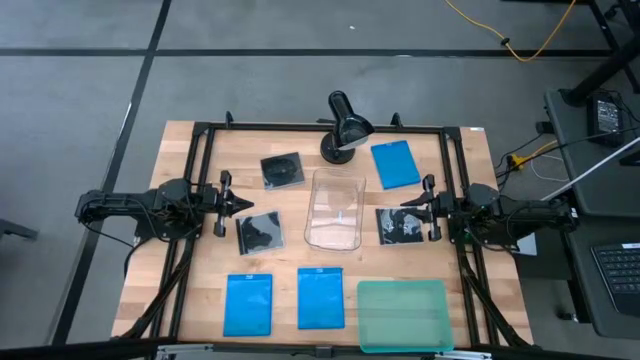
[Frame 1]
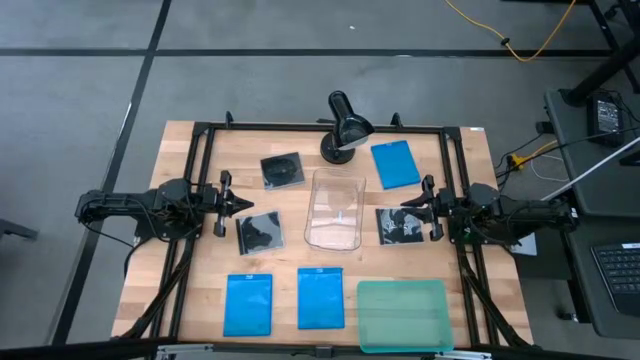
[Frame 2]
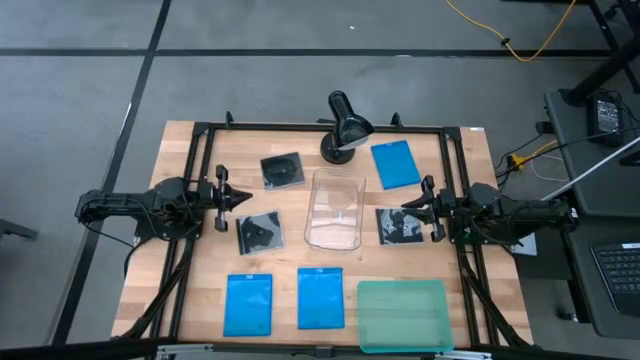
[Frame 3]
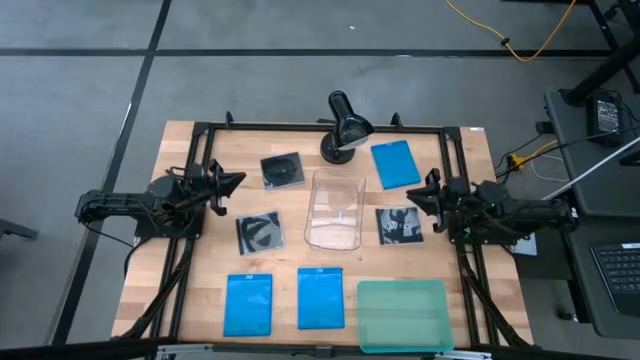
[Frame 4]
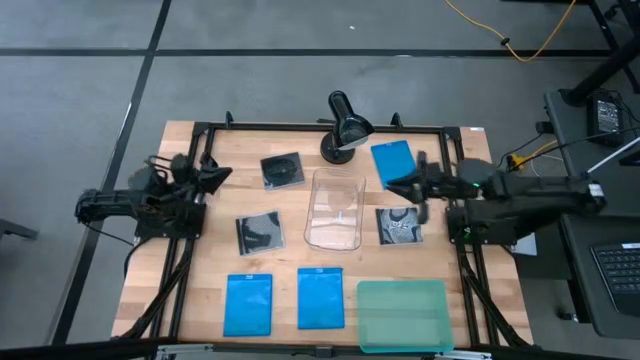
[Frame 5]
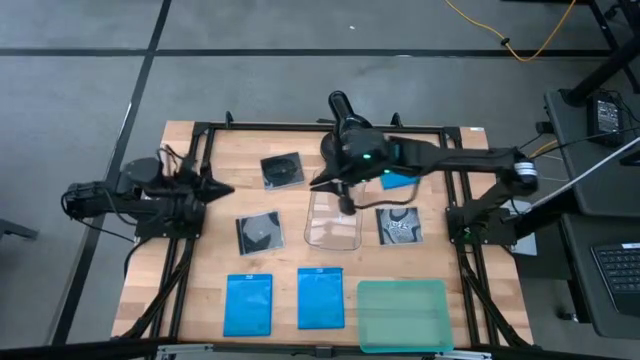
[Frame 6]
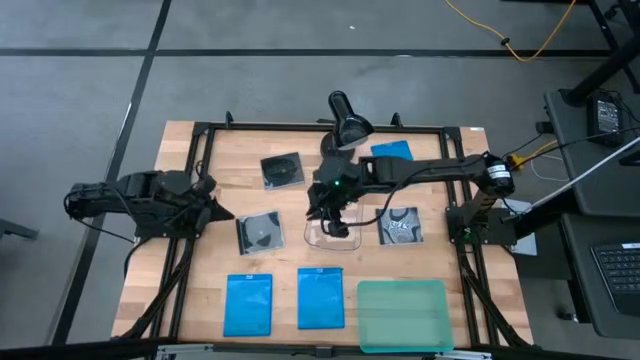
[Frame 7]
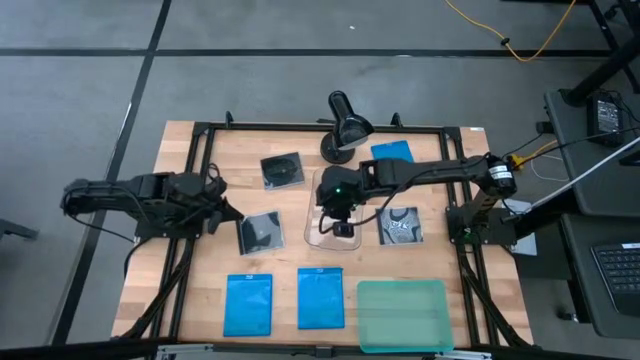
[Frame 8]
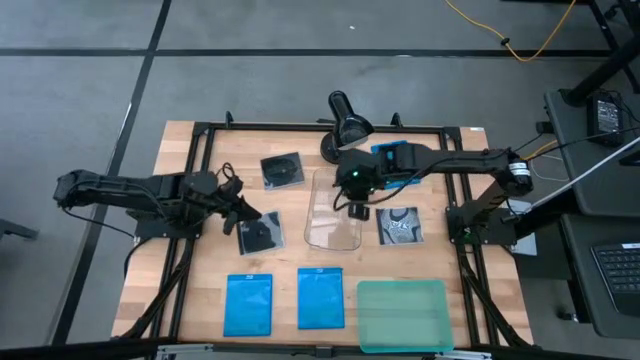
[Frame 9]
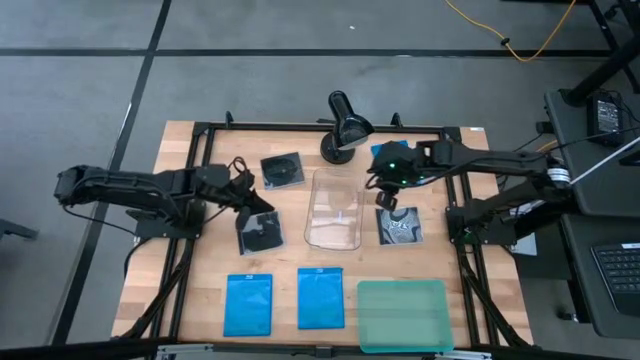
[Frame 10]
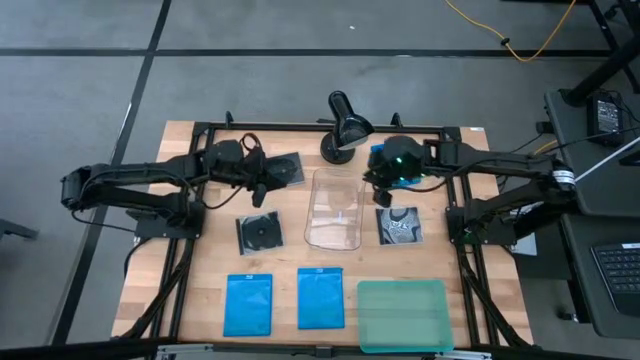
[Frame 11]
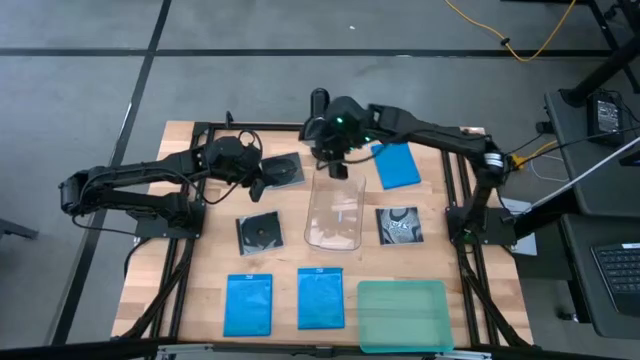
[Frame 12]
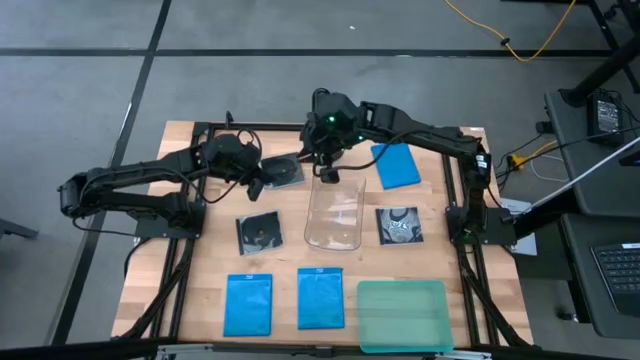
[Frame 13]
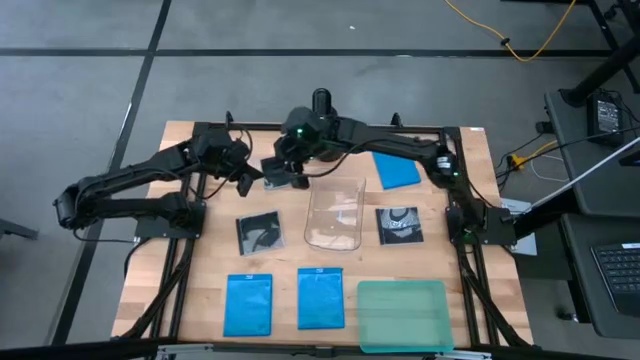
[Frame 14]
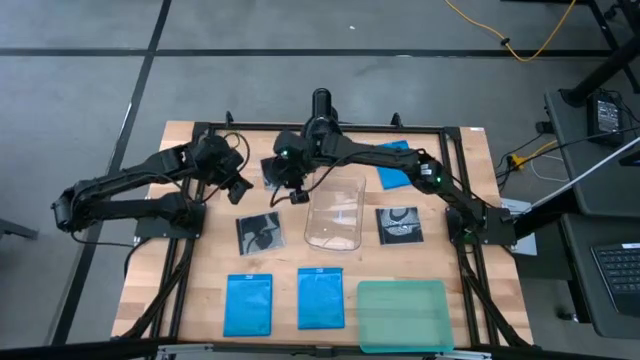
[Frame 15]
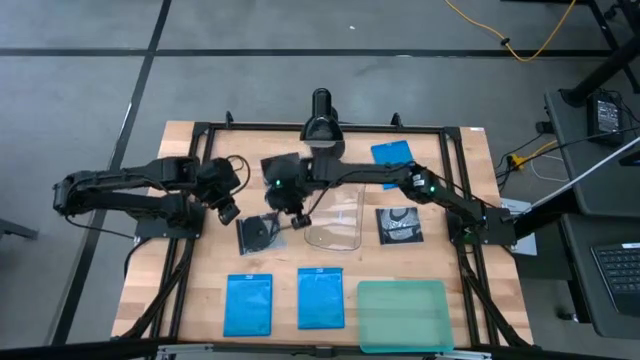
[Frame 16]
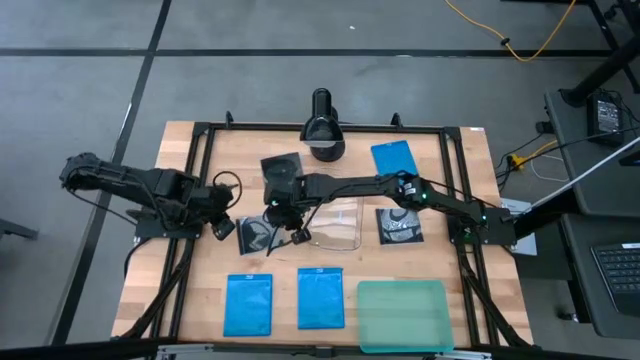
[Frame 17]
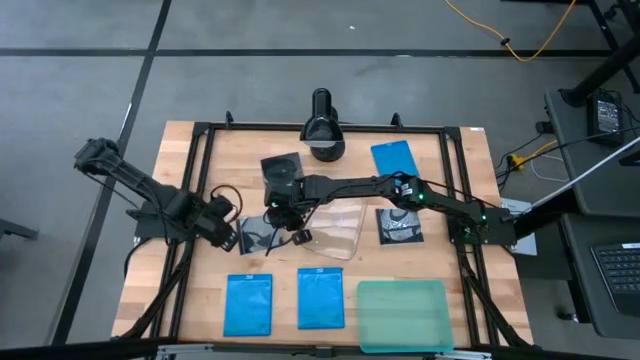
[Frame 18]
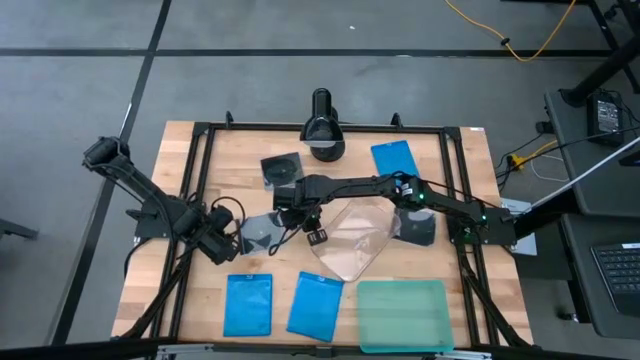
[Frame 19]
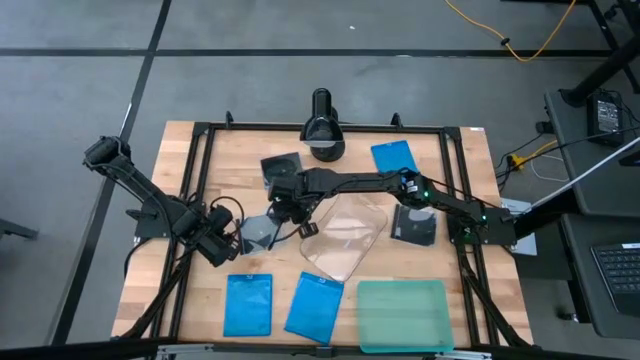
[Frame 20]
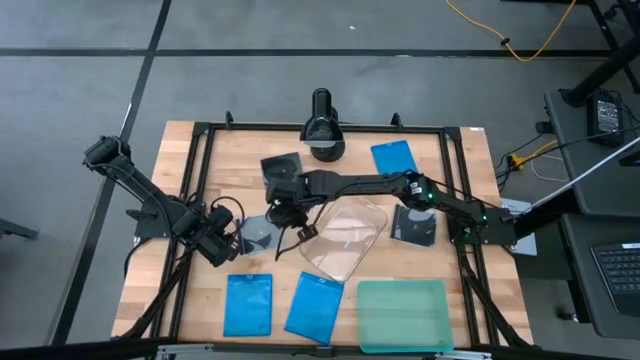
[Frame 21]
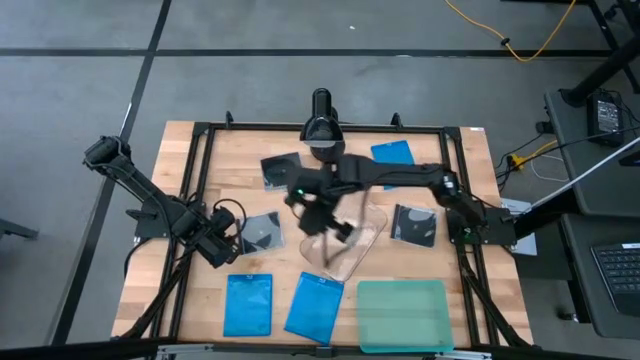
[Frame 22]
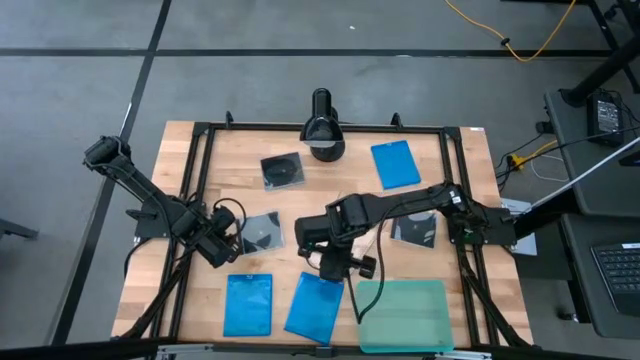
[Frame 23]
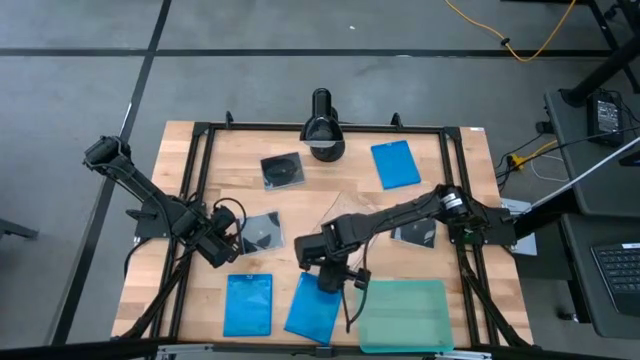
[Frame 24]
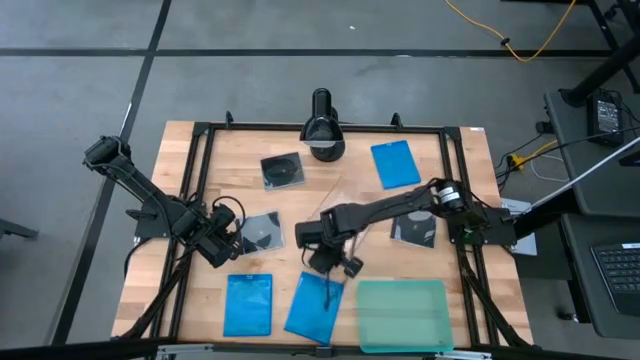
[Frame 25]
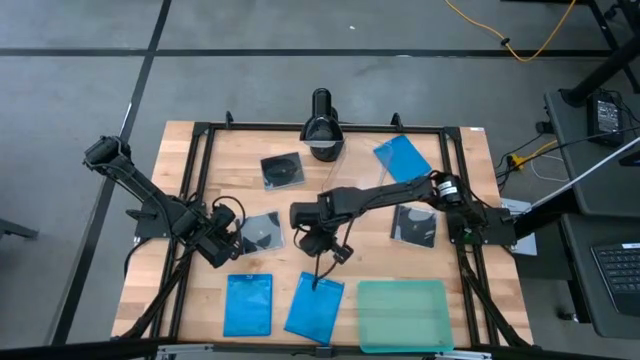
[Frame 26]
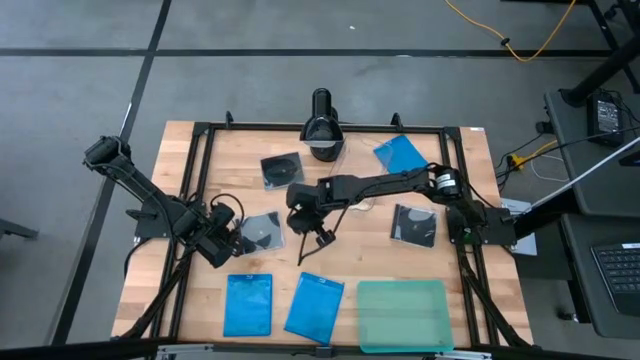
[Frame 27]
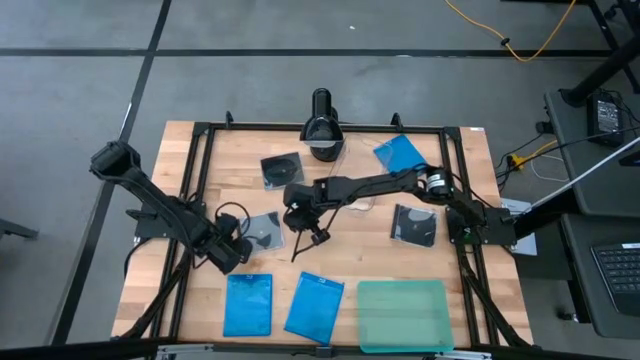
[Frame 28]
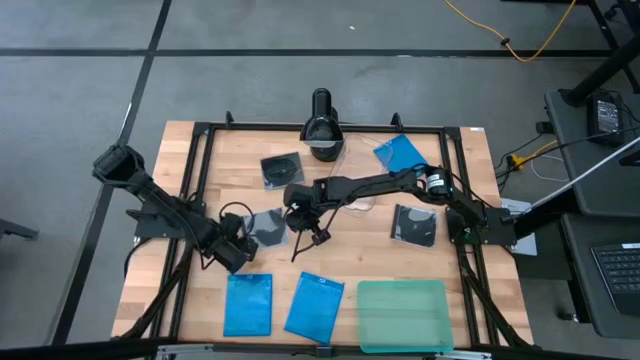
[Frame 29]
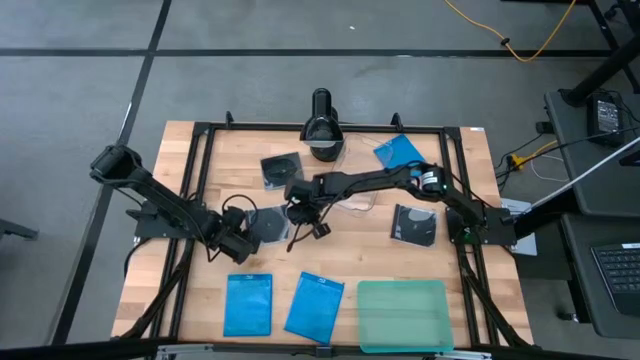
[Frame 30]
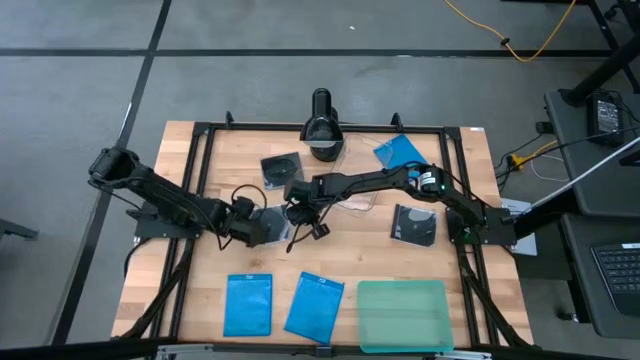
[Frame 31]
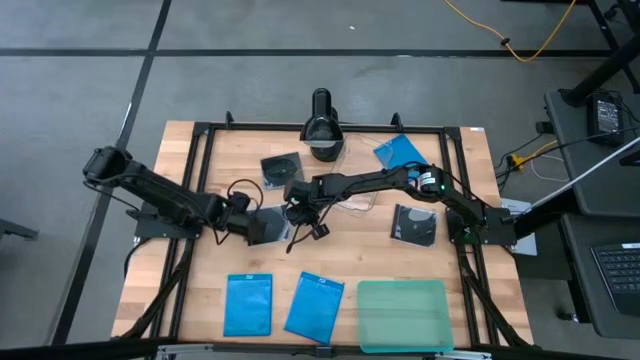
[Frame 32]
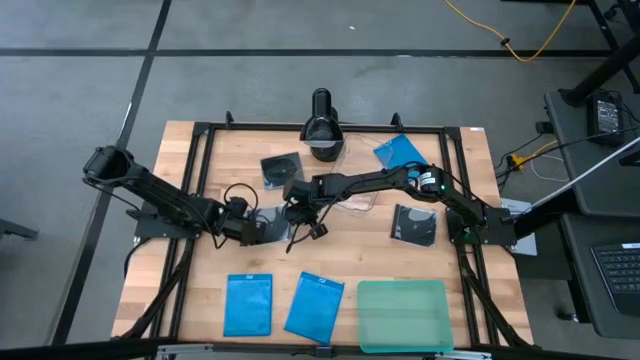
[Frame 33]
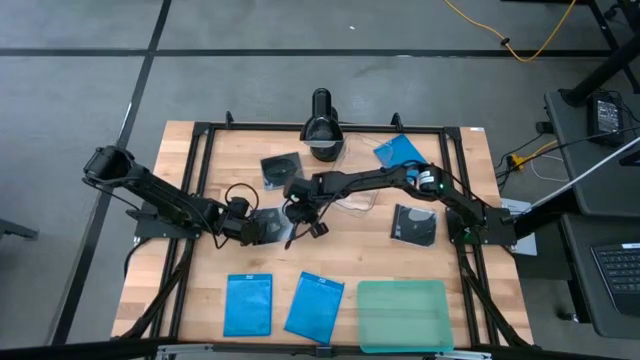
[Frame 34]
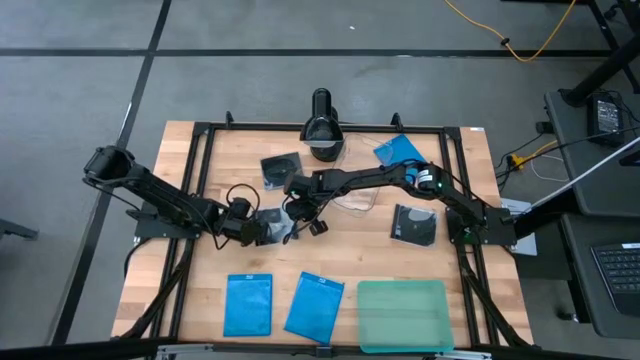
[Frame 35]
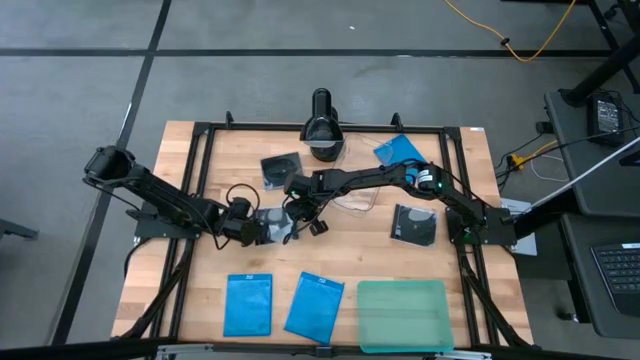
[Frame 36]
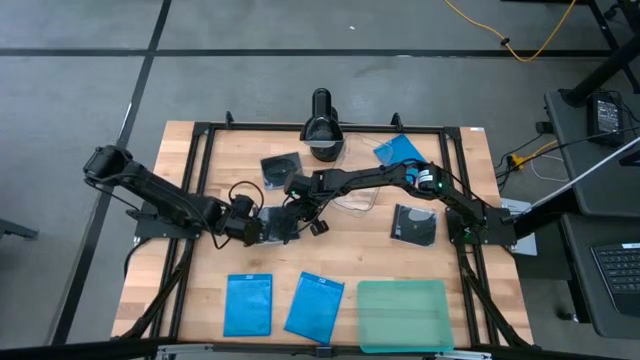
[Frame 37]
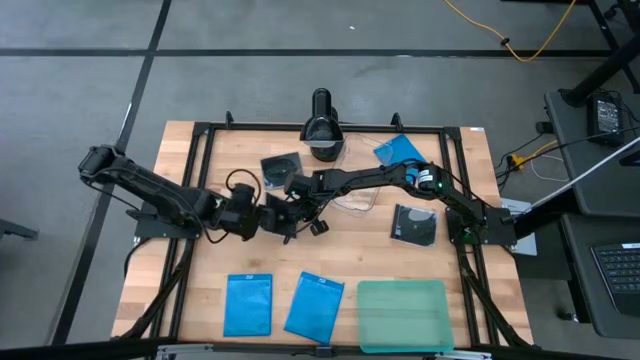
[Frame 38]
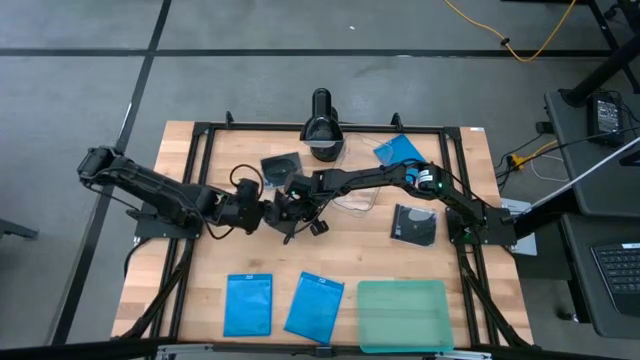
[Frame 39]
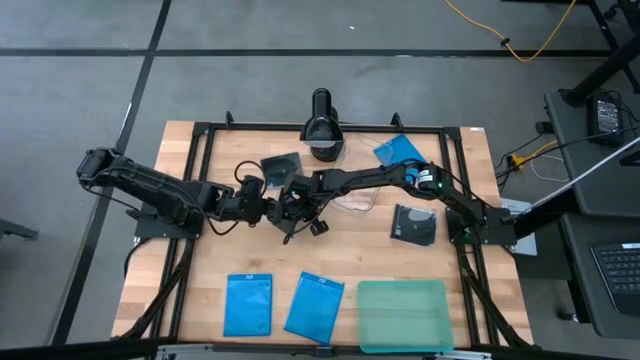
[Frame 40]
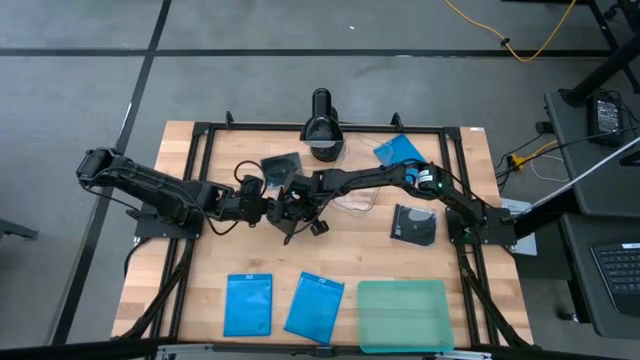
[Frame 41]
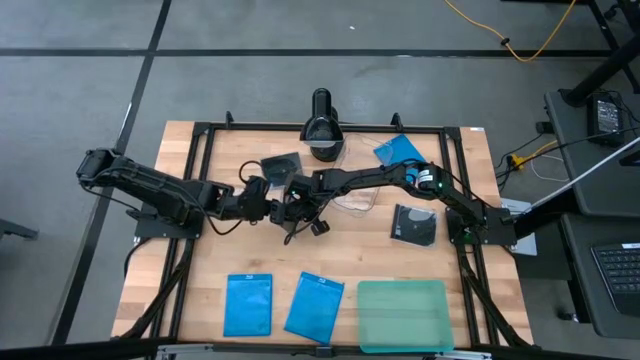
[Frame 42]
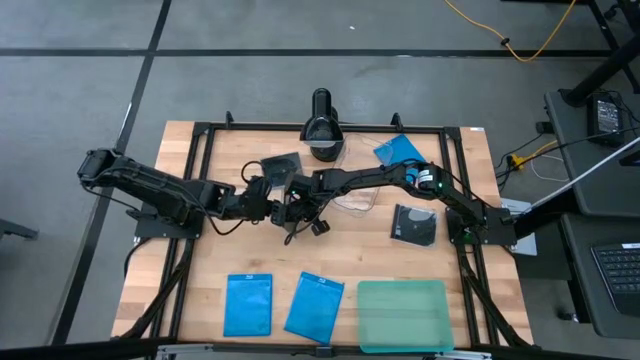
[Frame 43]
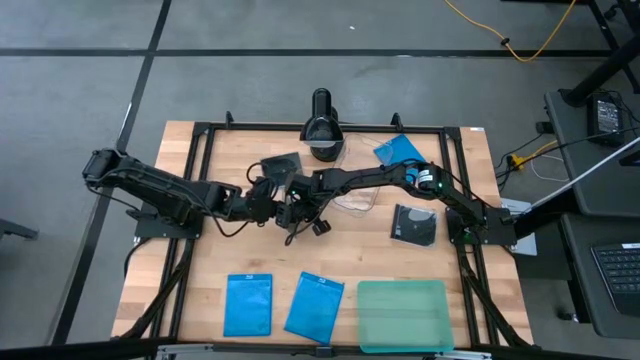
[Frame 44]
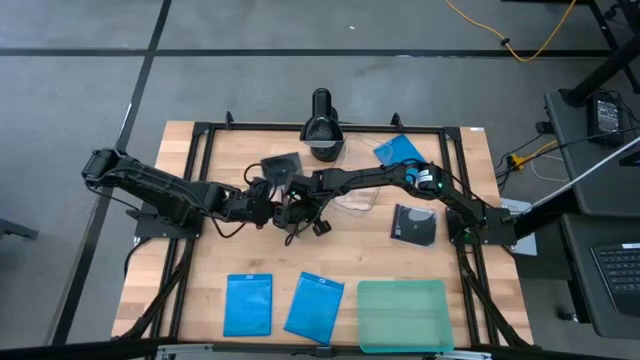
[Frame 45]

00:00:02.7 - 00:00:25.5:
Task: Pick & place jewel cases by type
Put the bottom left black CD case into the transparent bin
